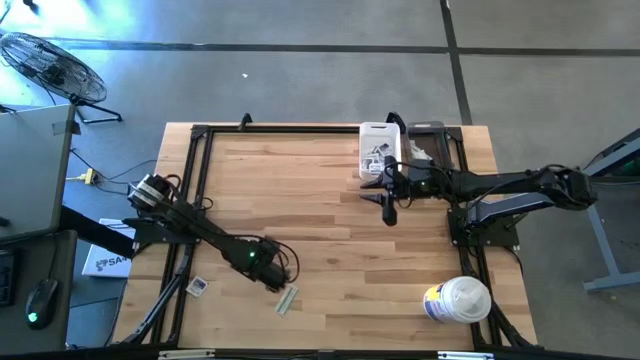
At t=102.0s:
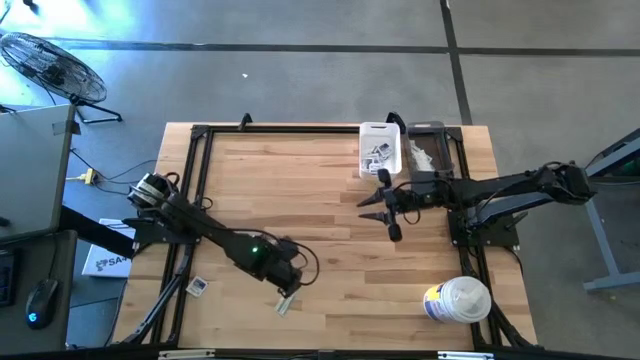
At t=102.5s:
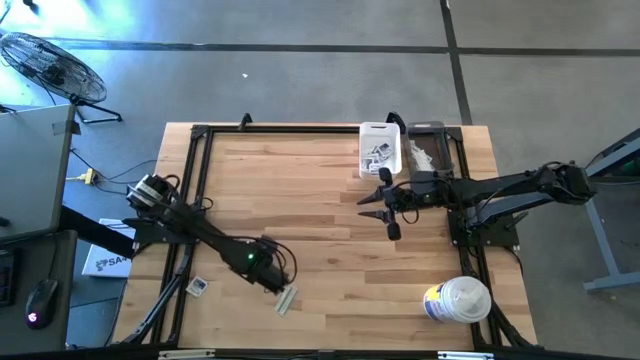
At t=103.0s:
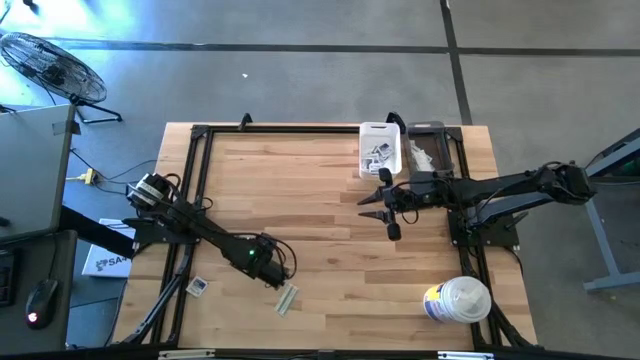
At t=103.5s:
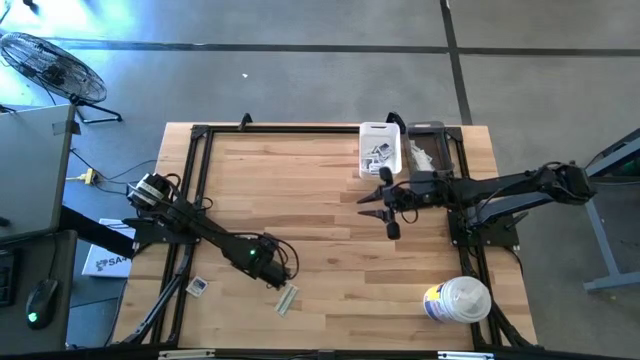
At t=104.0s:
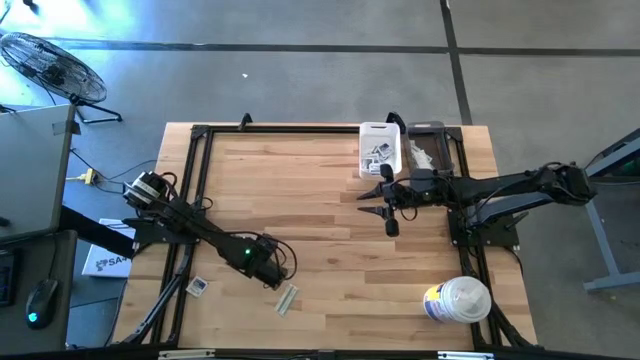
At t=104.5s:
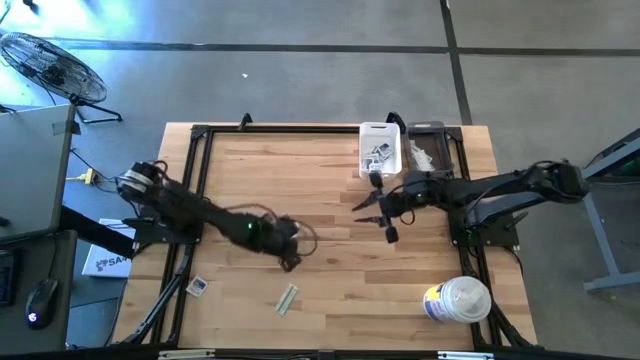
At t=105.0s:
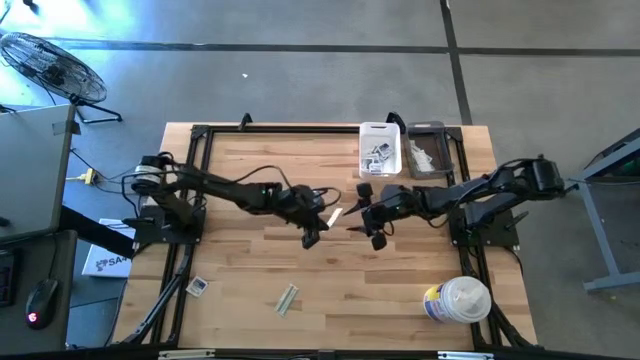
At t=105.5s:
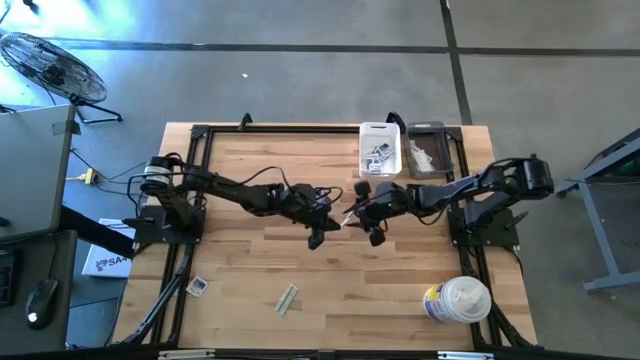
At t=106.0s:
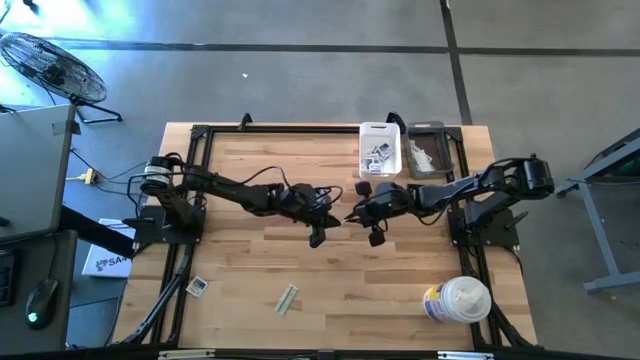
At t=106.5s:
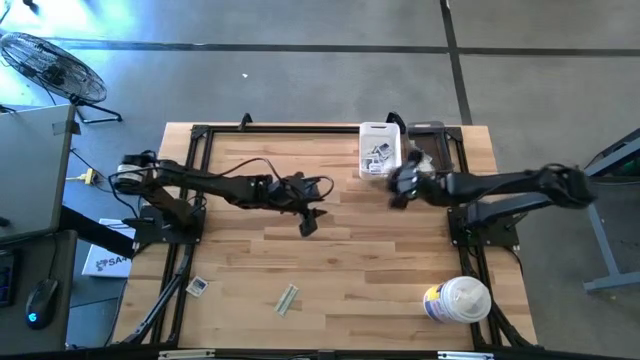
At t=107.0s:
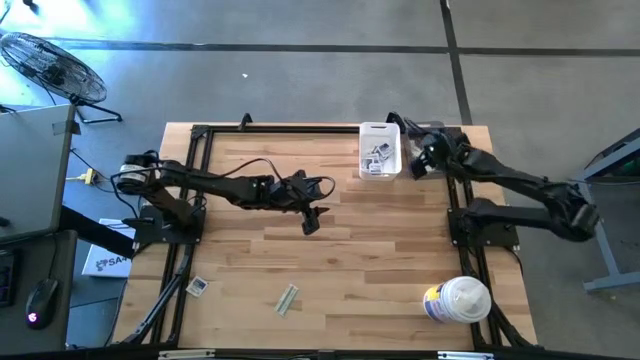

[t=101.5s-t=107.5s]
Task: Pick & Place First Aid Supplies
Put the bandage into the gray bin

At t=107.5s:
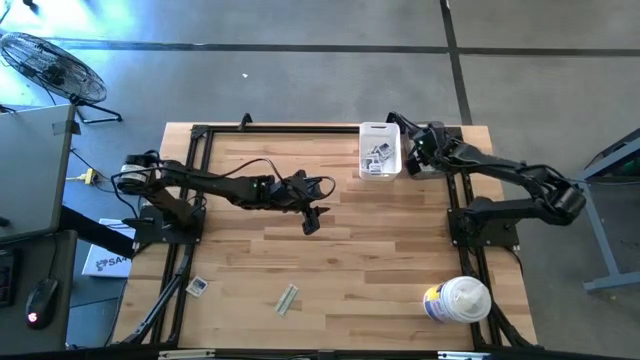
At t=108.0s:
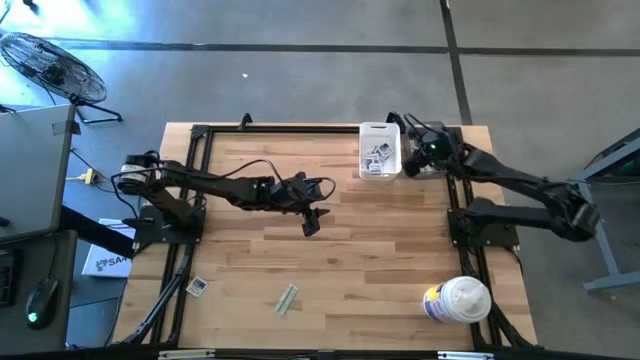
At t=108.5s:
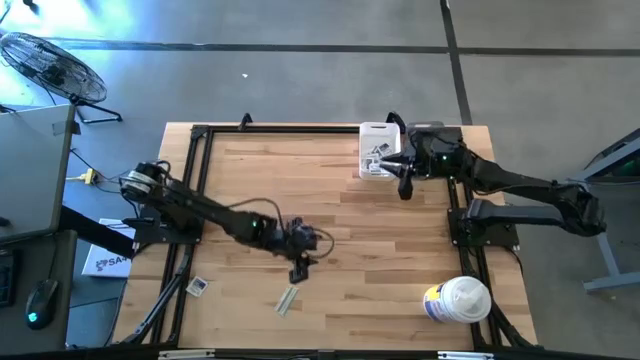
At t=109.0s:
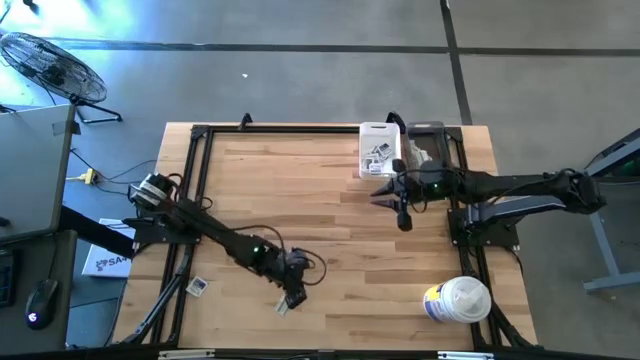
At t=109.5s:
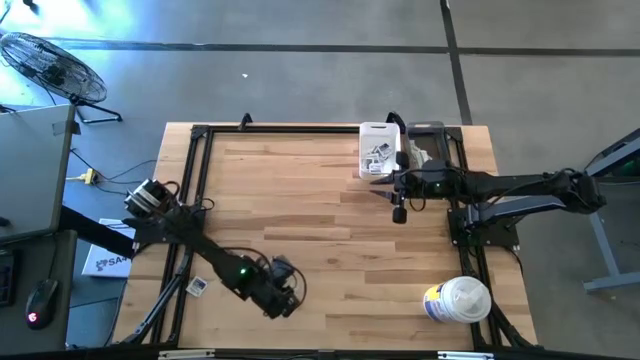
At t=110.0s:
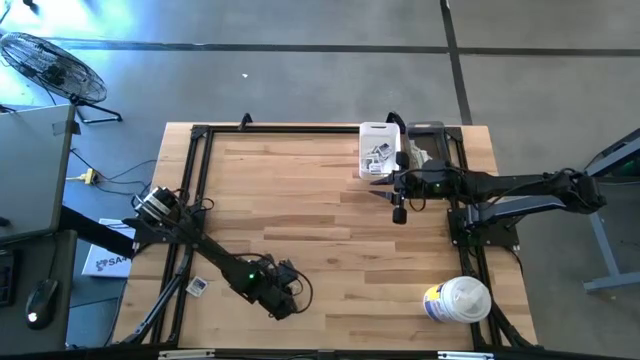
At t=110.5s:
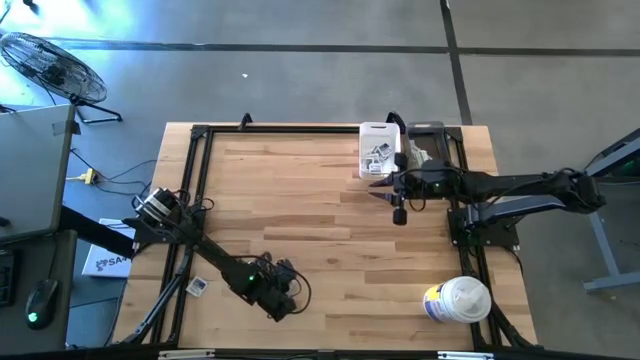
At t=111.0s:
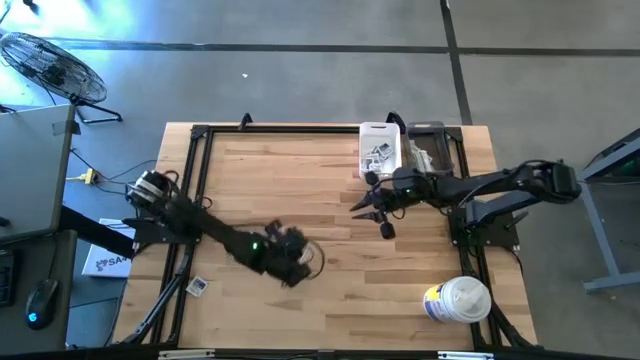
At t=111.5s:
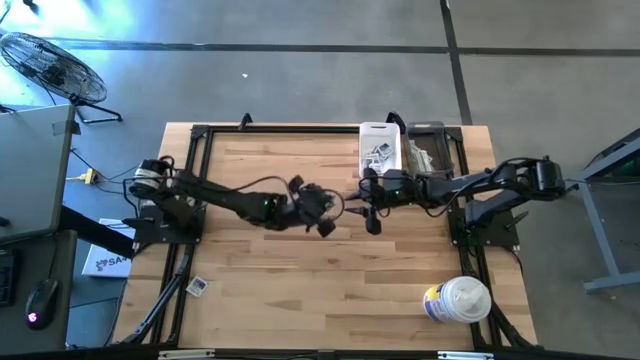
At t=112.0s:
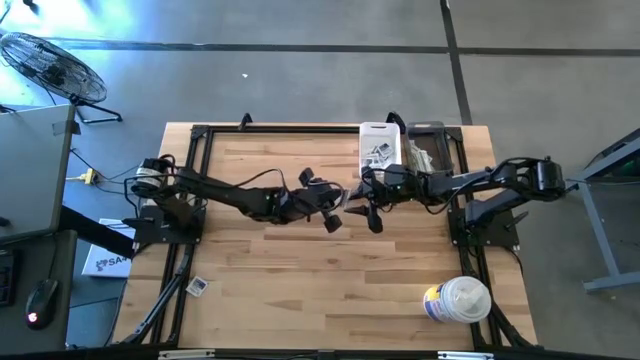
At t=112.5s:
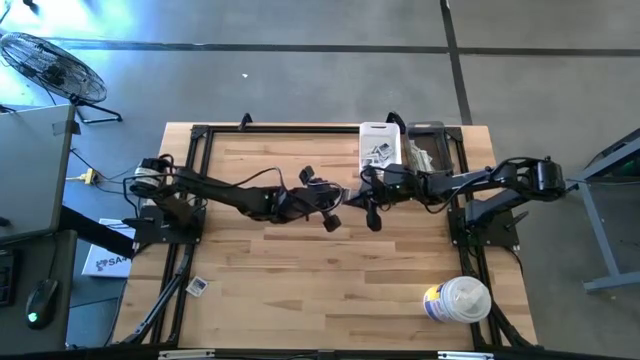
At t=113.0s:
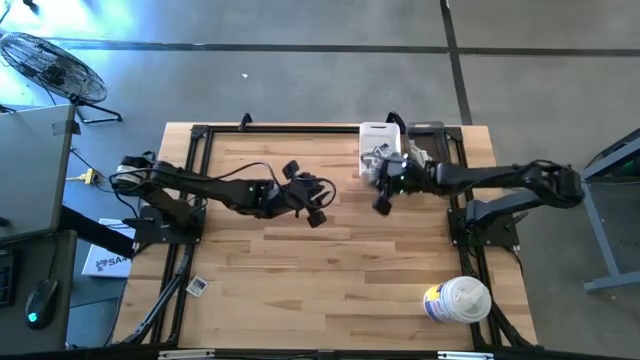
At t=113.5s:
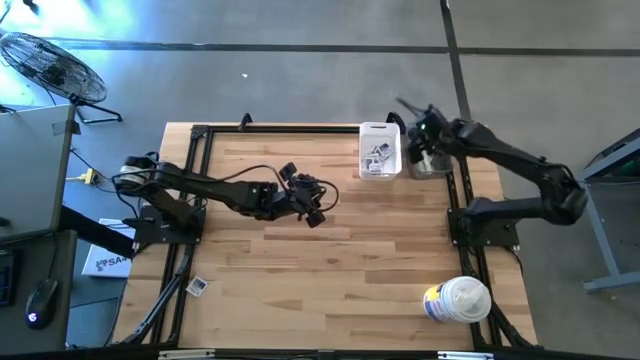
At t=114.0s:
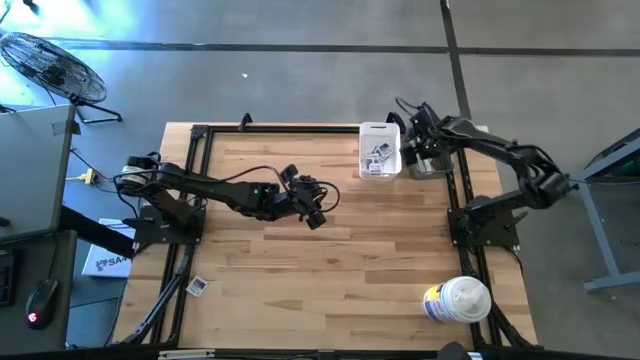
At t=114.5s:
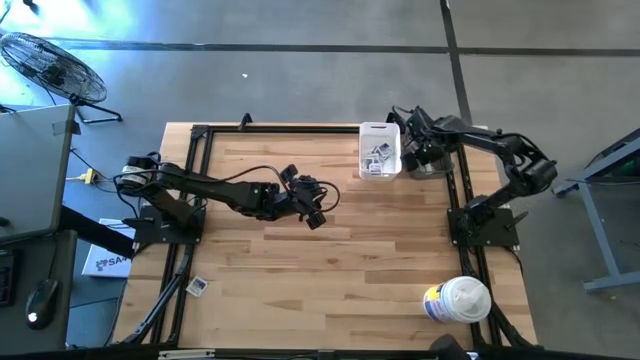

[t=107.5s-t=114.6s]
Put the bandage into the gray bin

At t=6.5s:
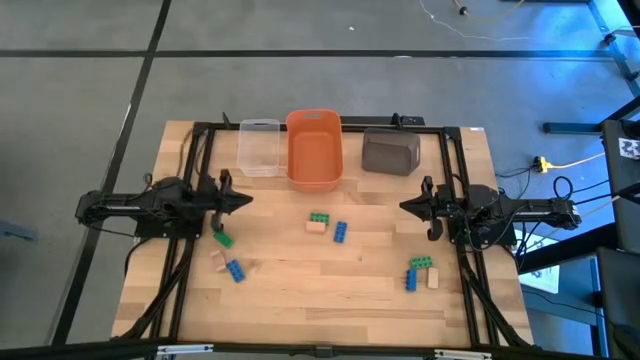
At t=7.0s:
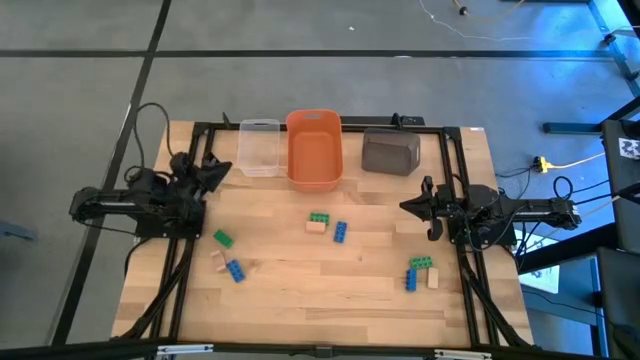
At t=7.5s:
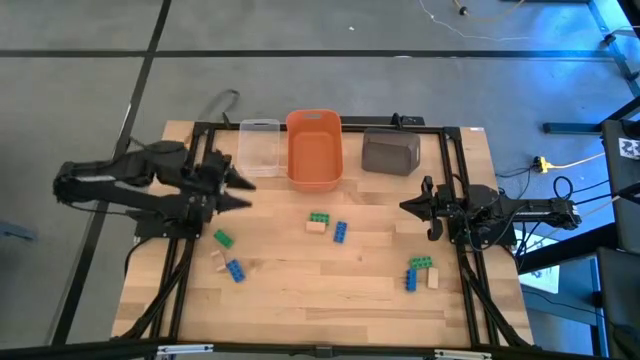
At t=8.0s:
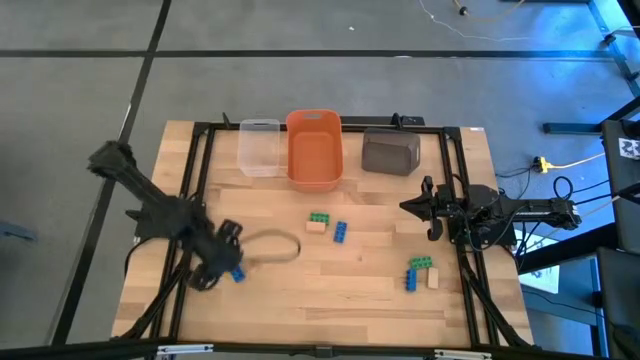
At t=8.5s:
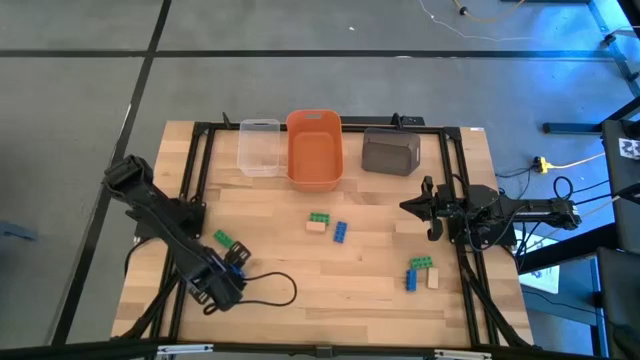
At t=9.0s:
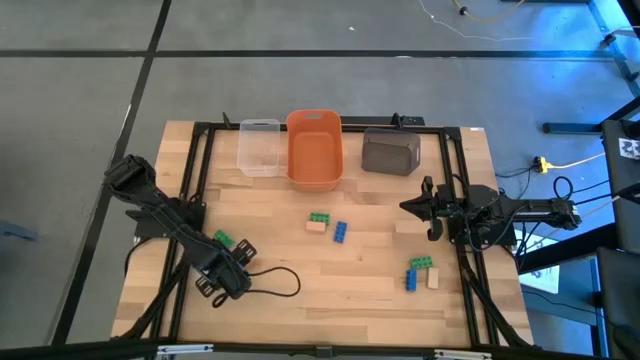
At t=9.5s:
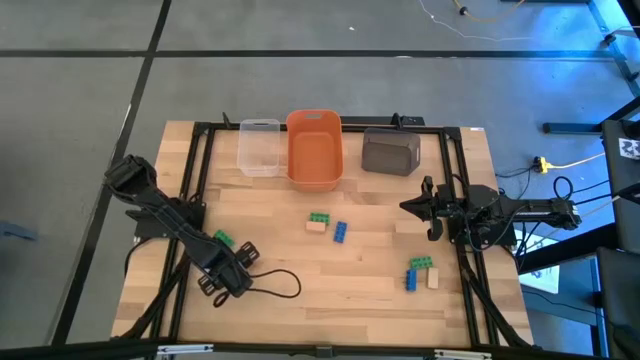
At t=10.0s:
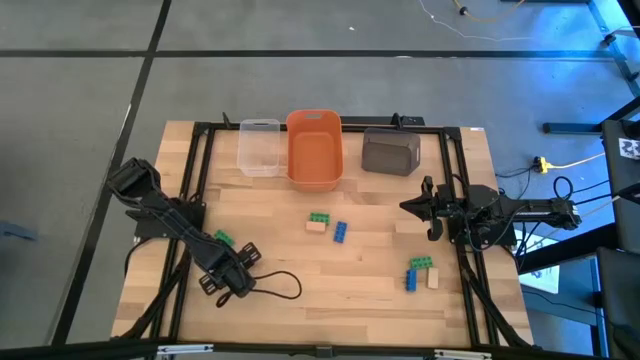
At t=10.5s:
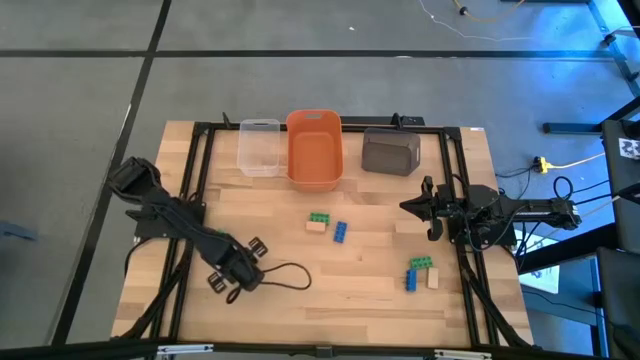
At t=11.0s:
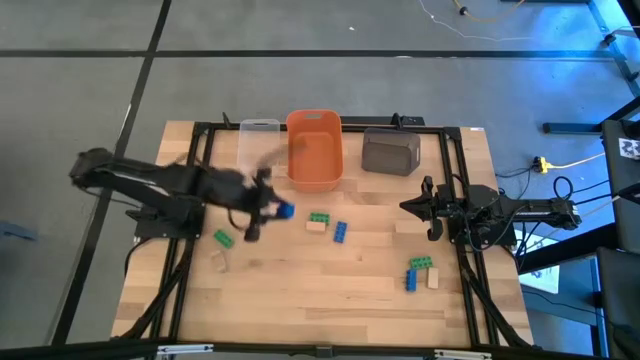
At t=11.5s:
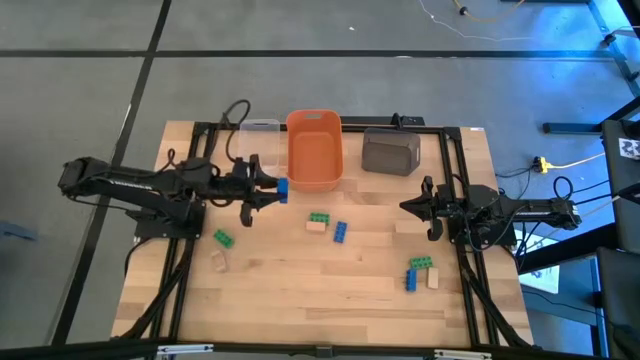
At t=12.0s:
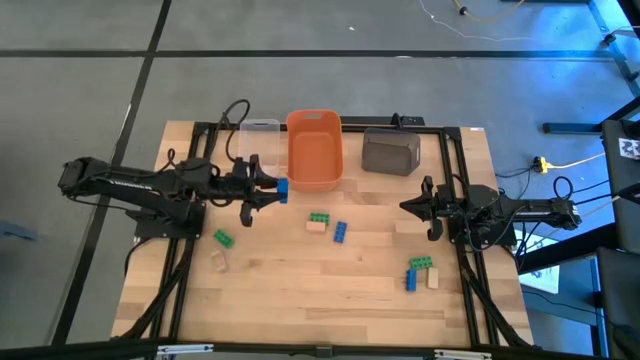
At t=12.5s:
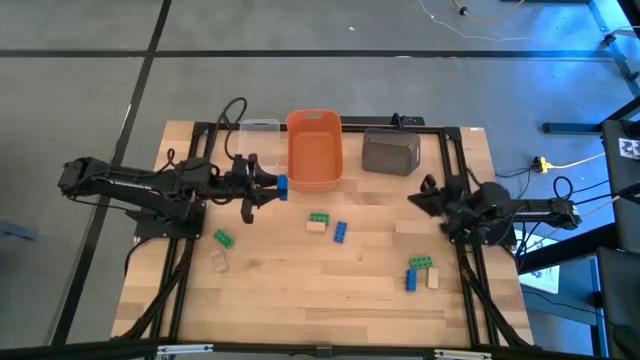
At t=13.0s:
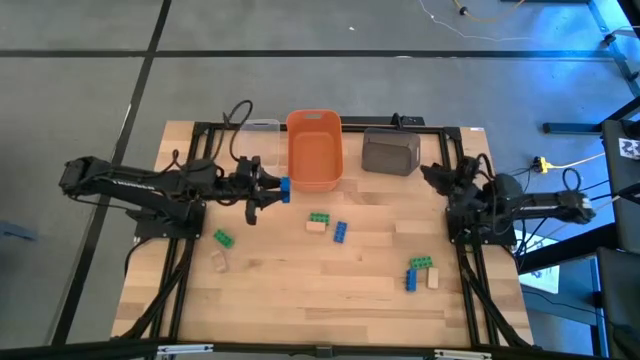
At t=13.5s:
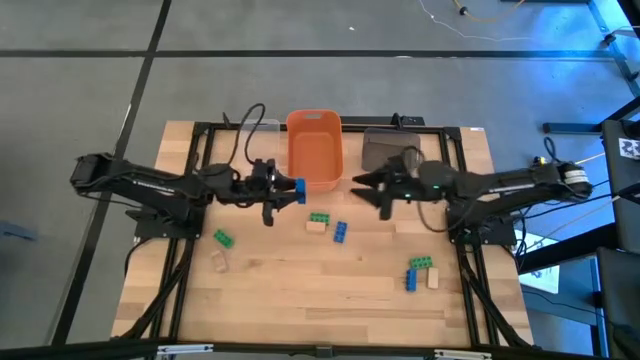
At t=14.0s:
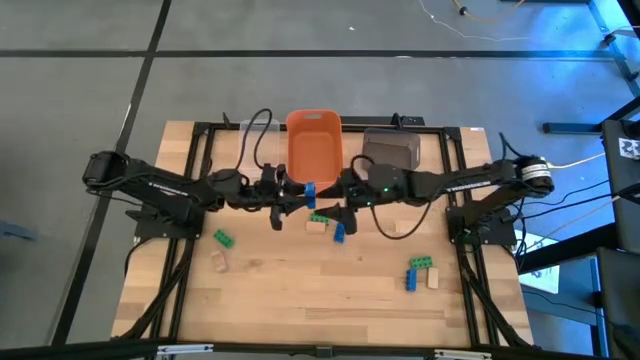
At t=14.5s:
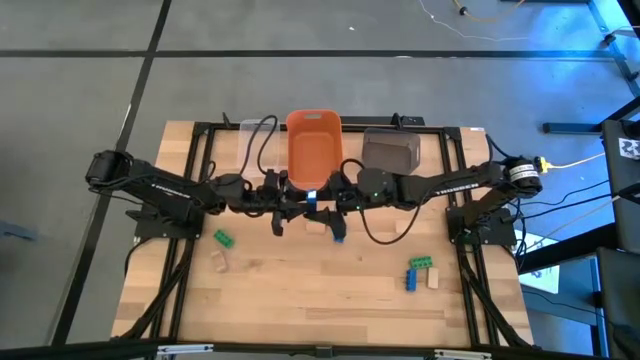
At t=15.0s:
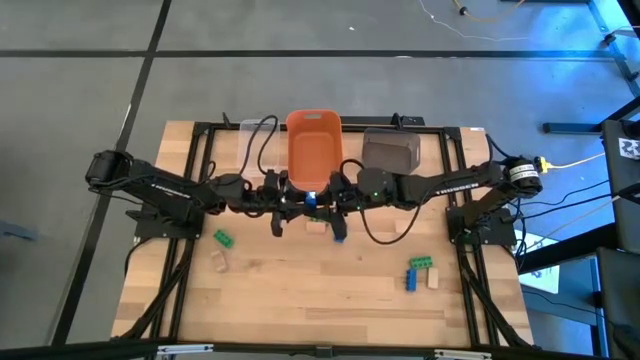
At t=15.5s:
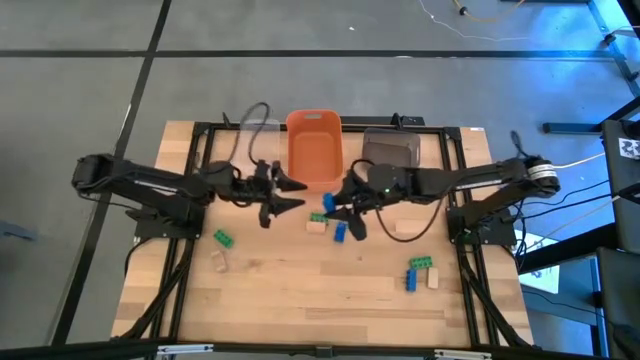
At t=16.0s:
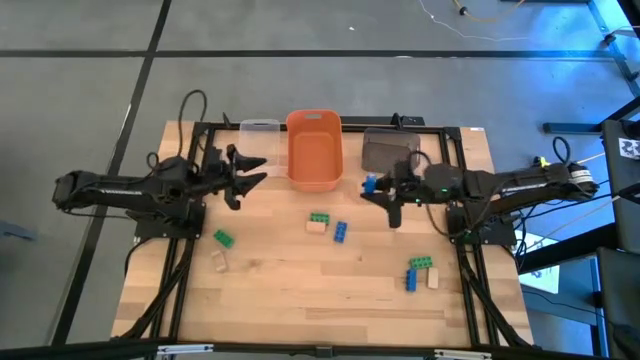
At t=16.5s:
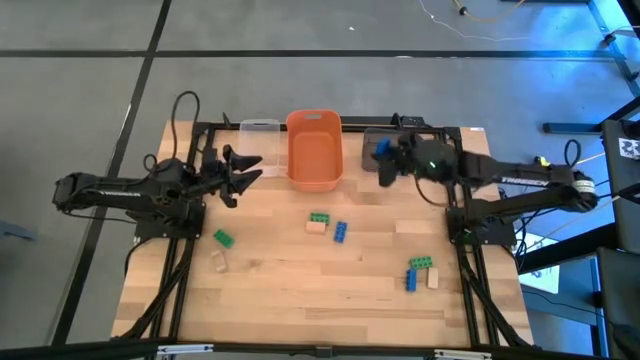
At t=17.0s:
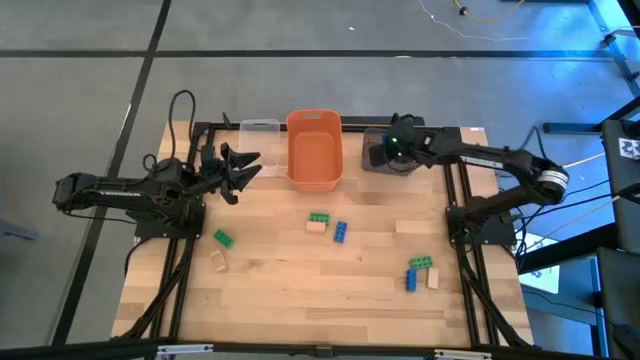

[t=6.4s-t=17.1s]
Task: Sort & place blocks by color
Put the bottom left blue game piece into the black bin
